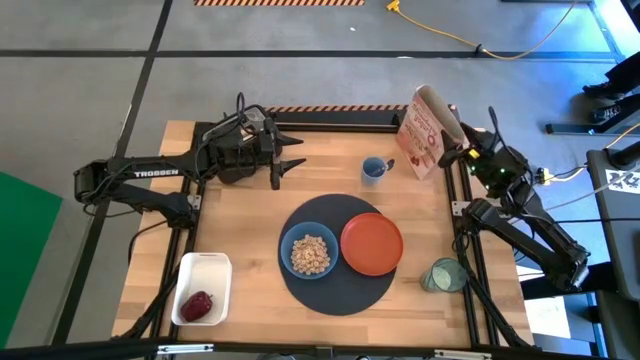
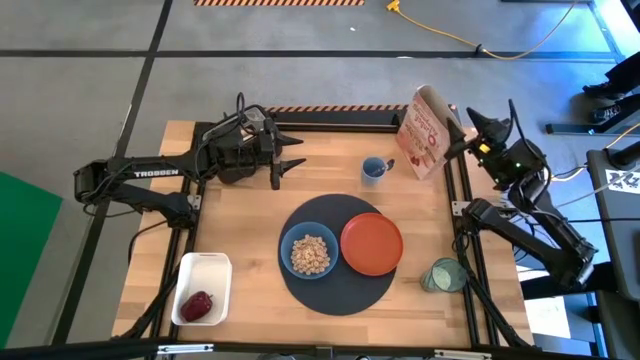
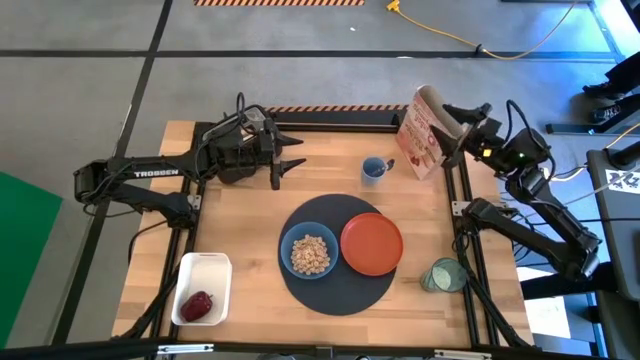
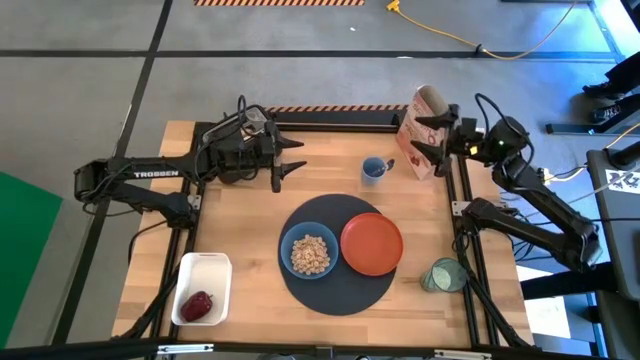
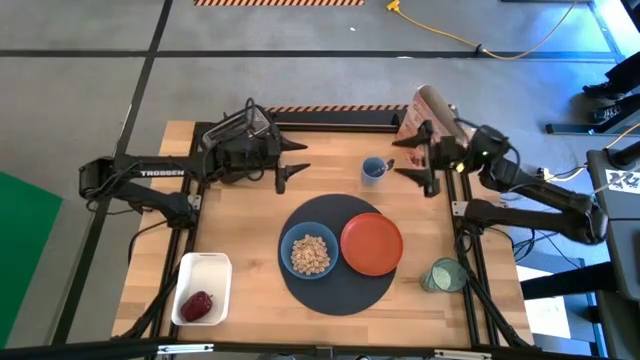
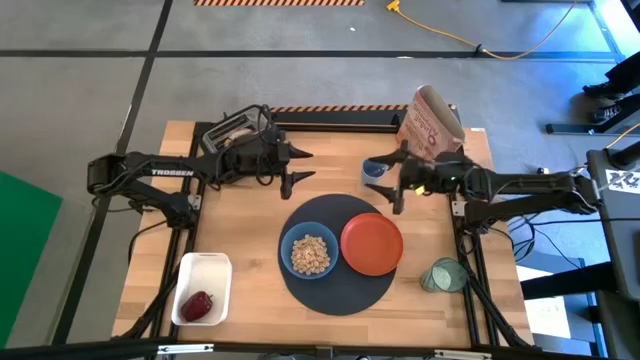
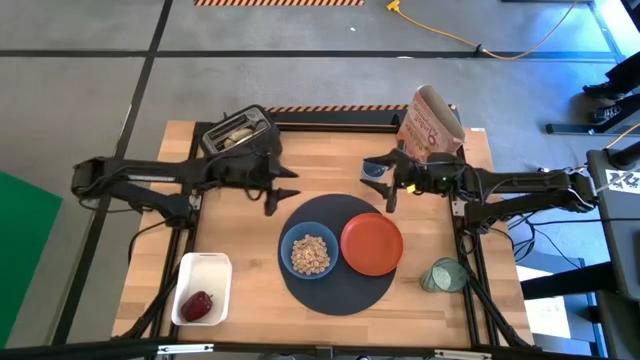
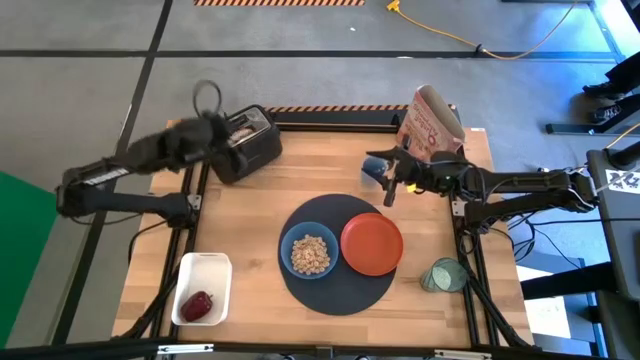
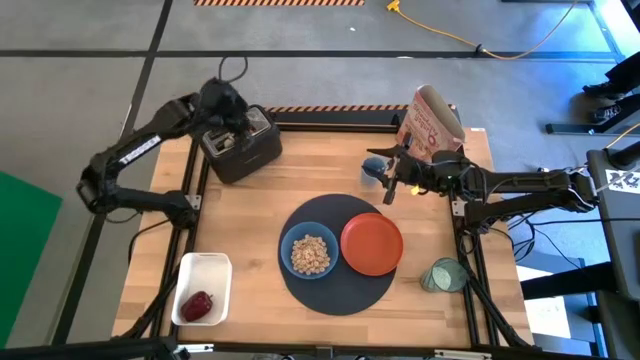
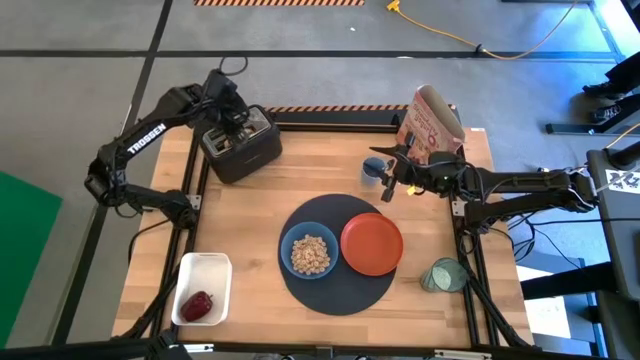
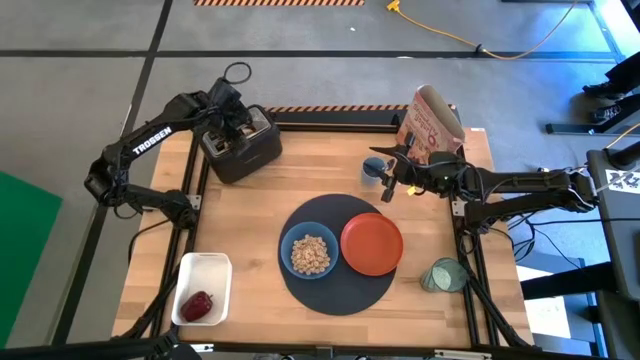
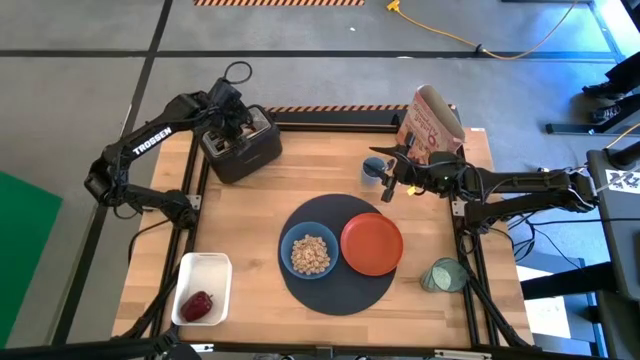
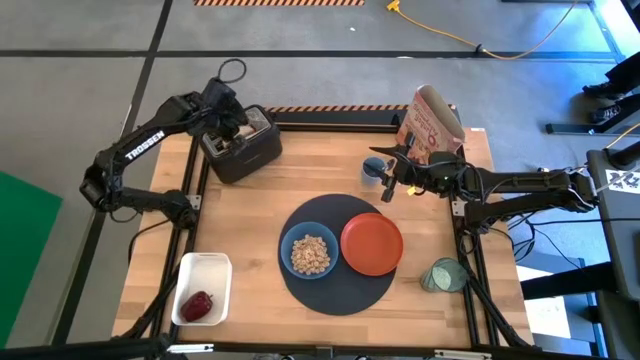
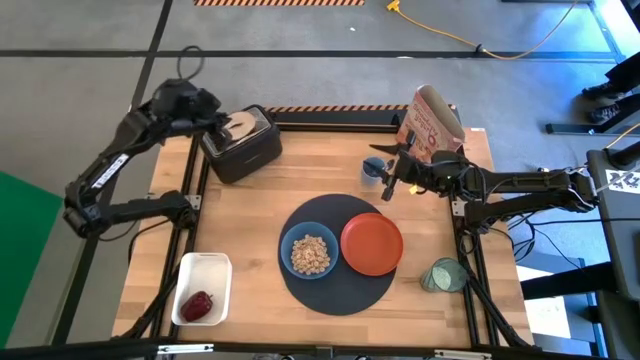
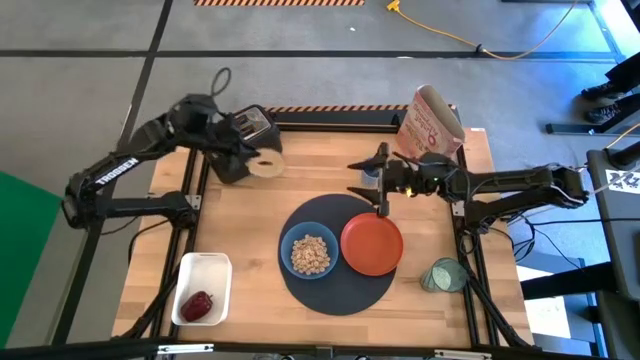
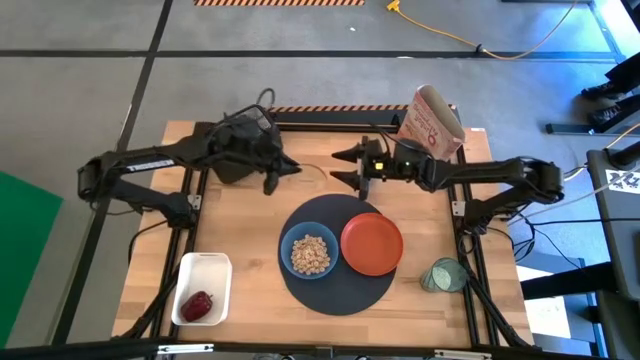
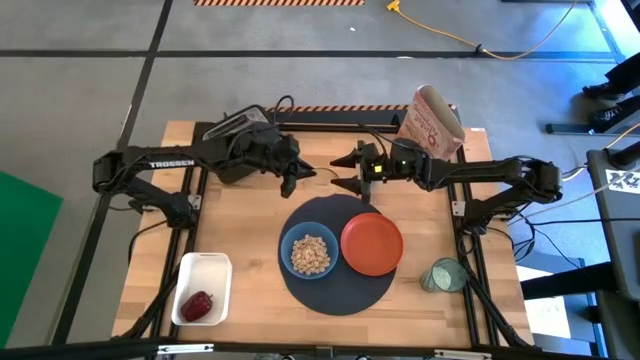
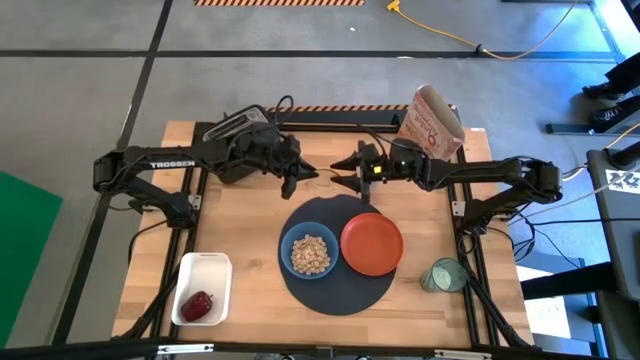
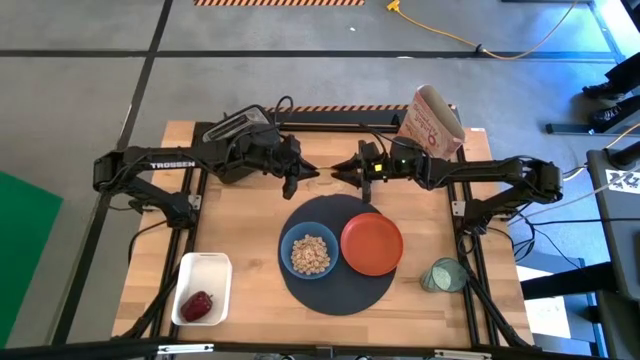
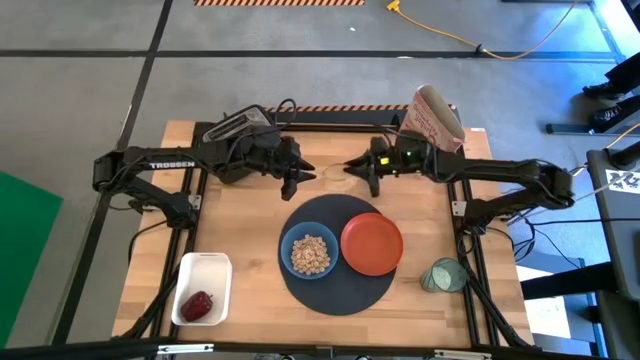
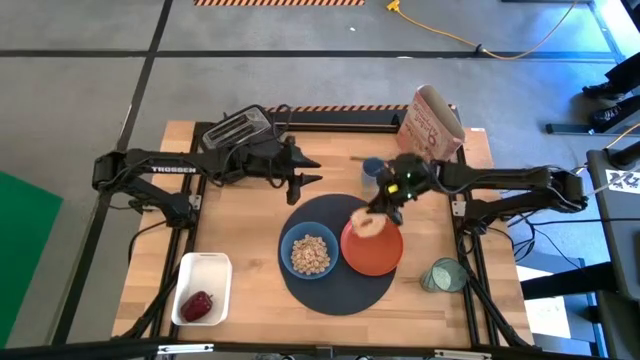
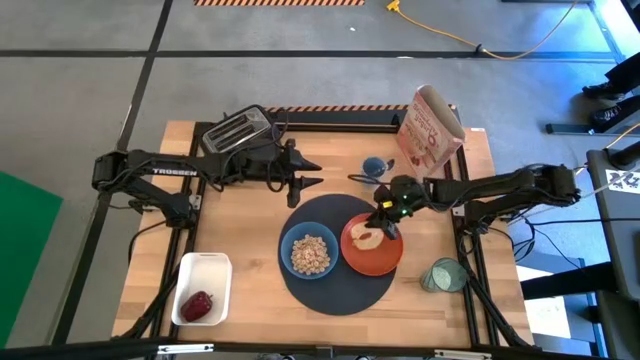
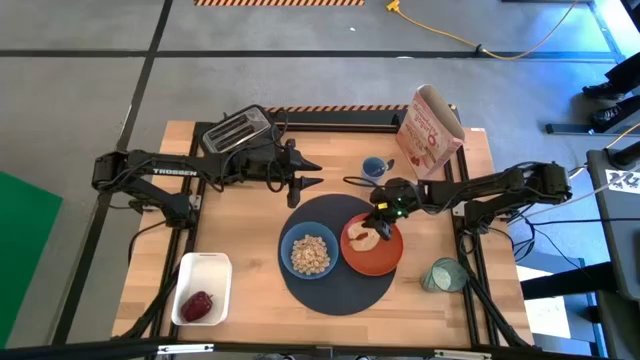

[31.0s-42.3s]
Task: Arrange a breakfast setting
Put the toasted bread on the orange plate

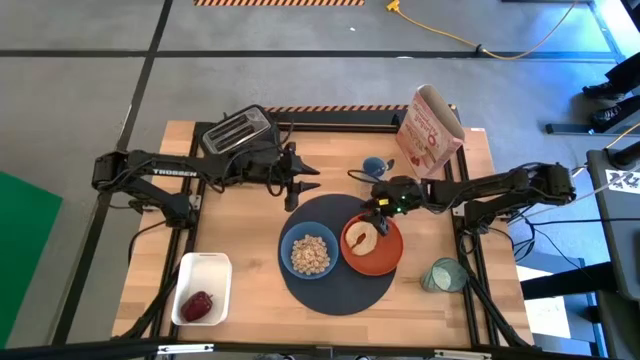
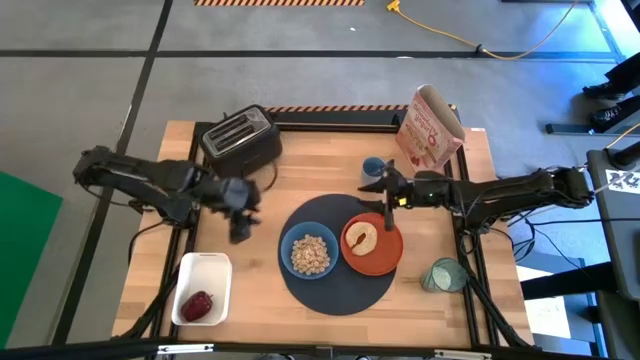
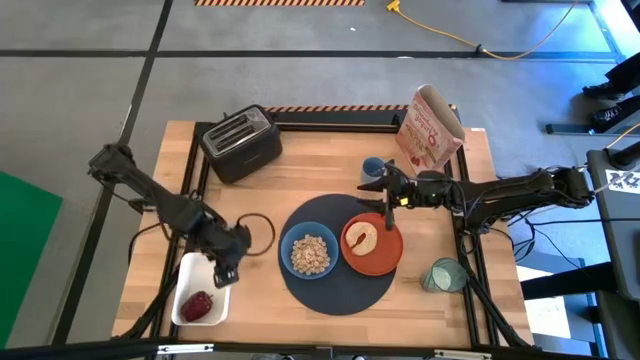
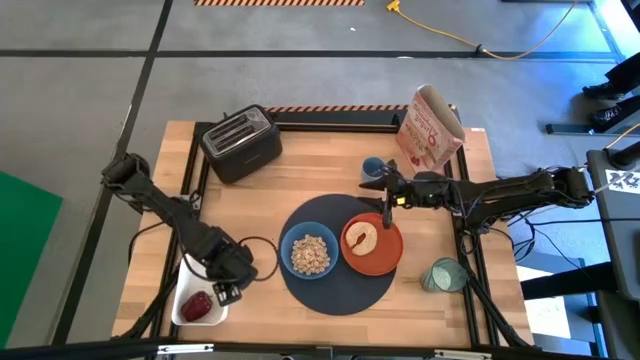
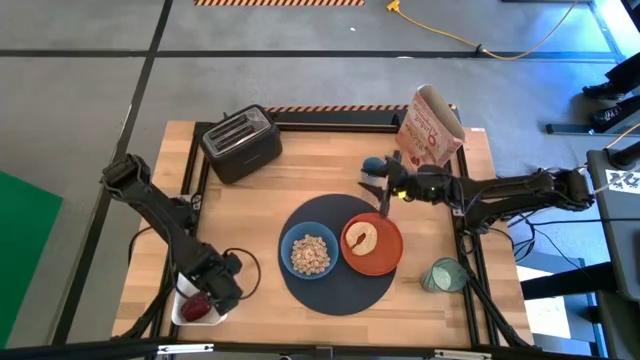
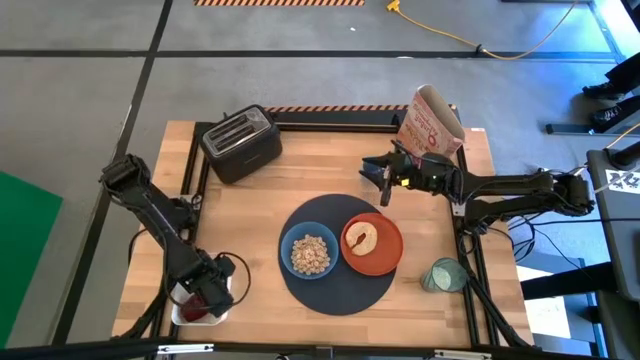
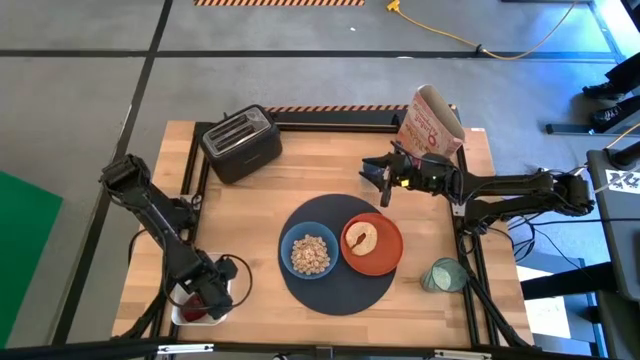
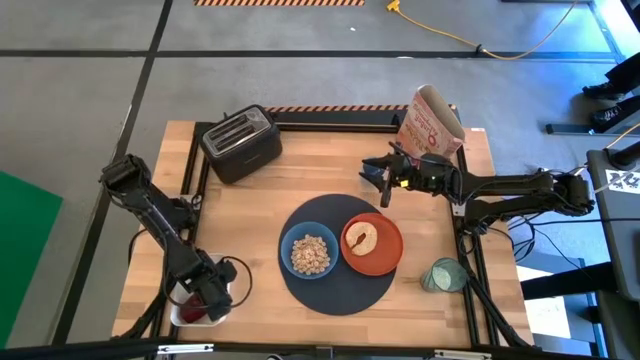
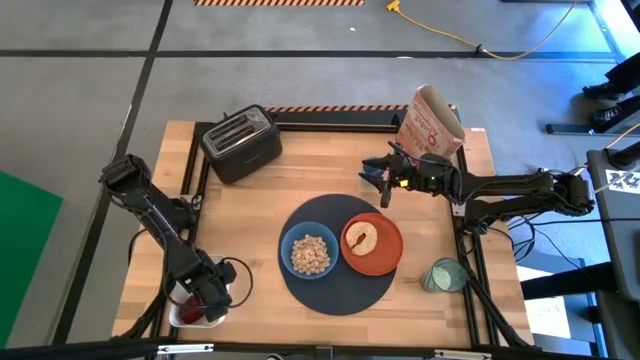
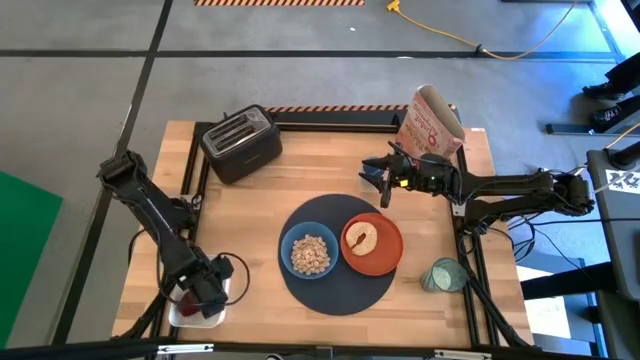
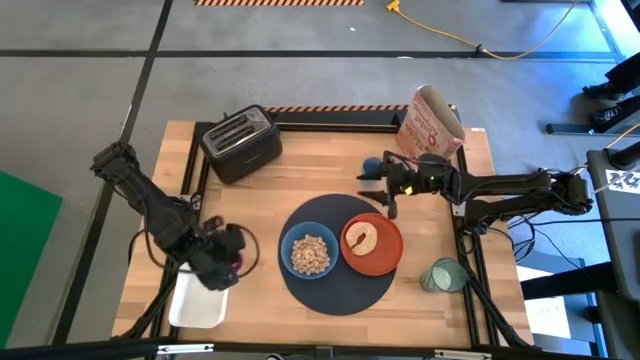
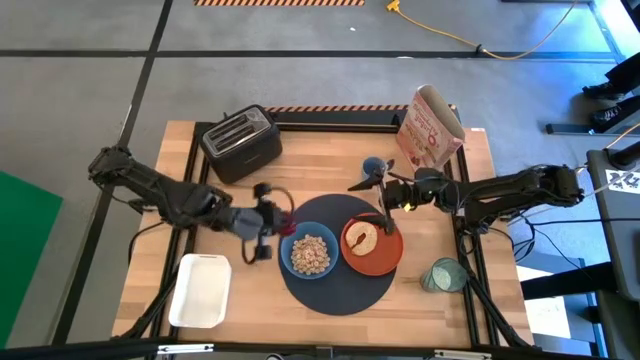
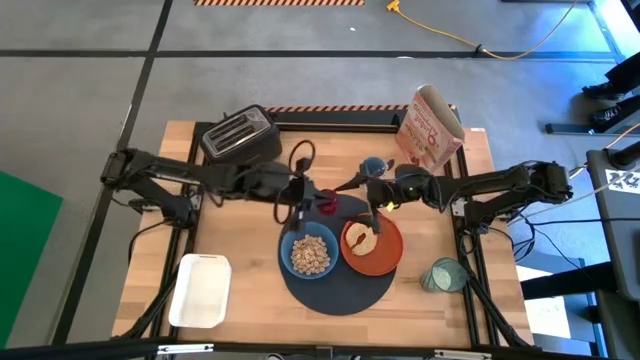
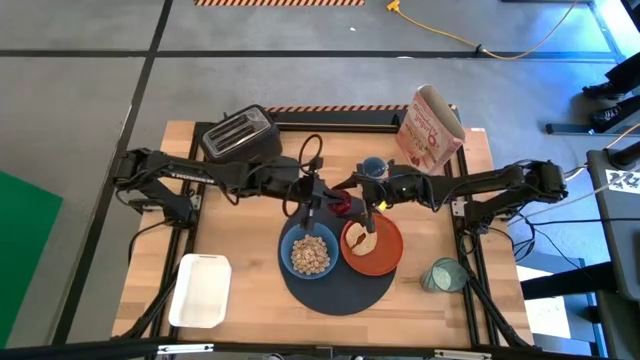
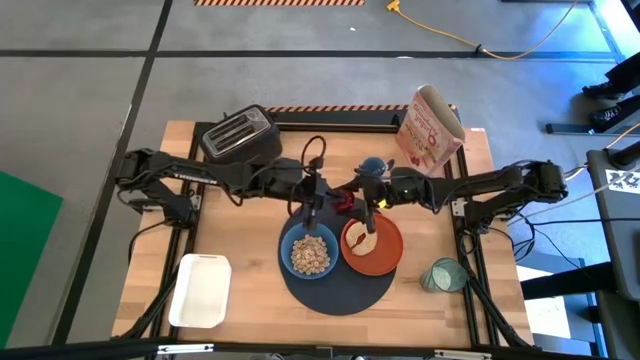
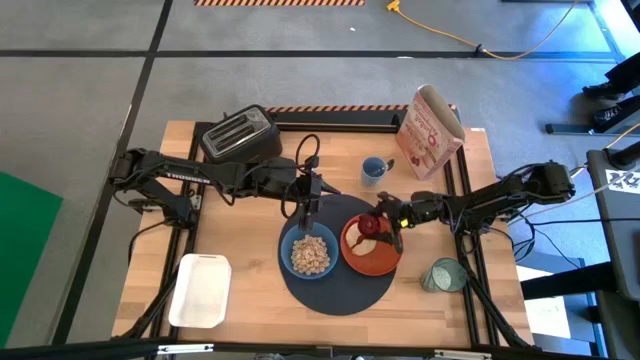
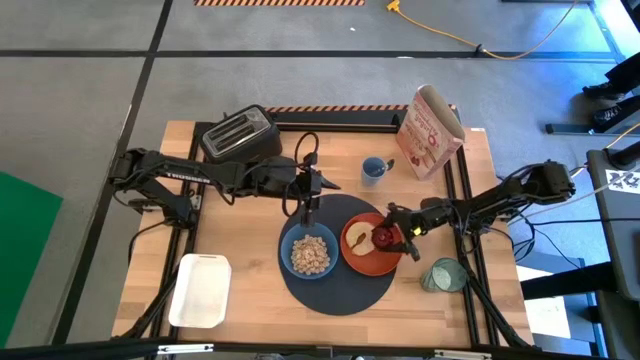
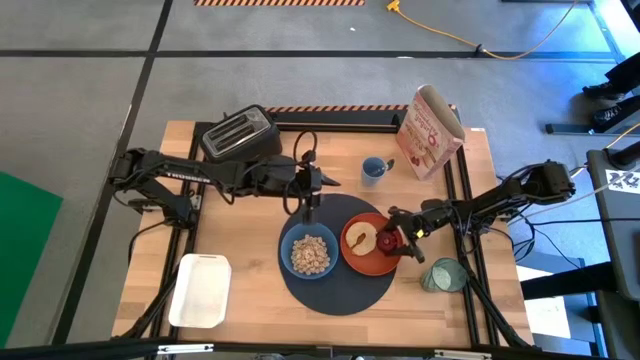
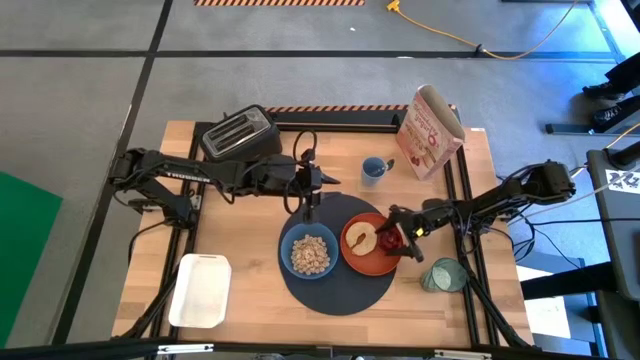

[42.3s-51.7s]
Put the apple on the orange plate

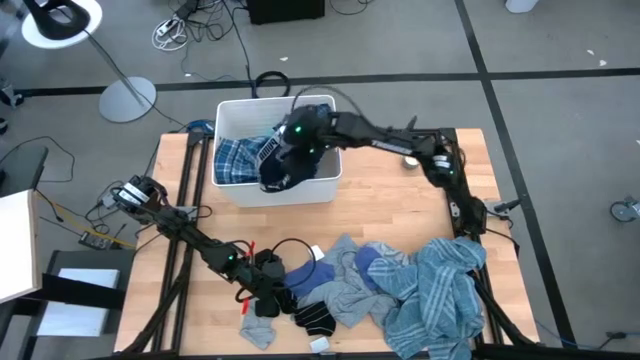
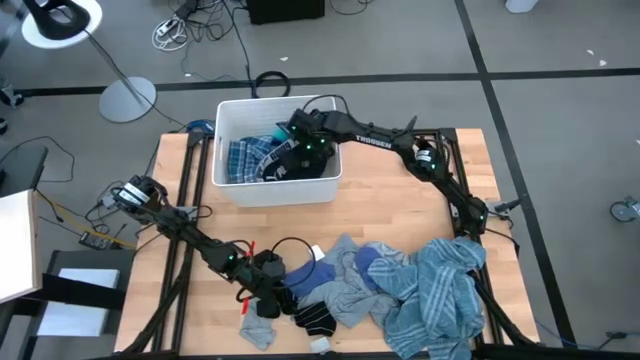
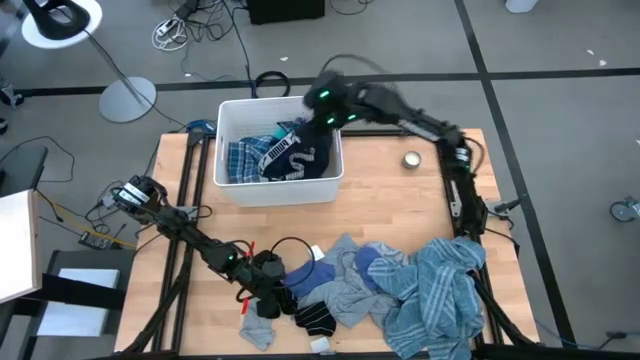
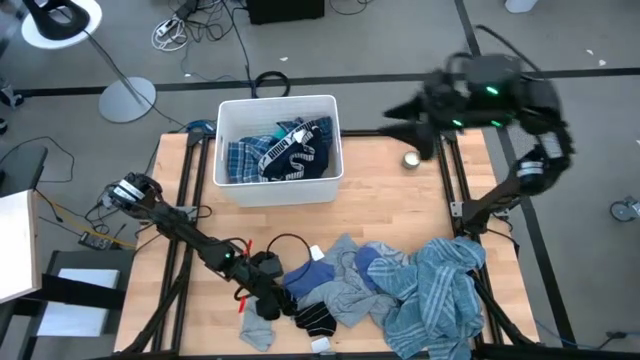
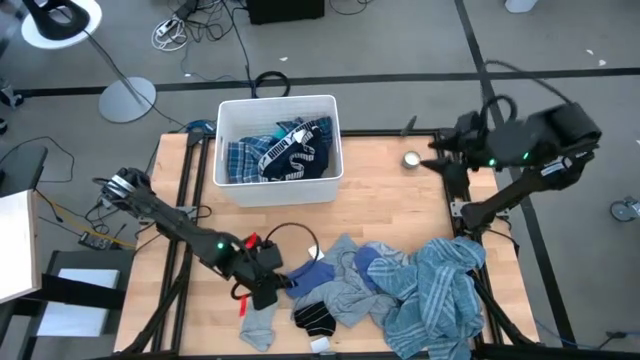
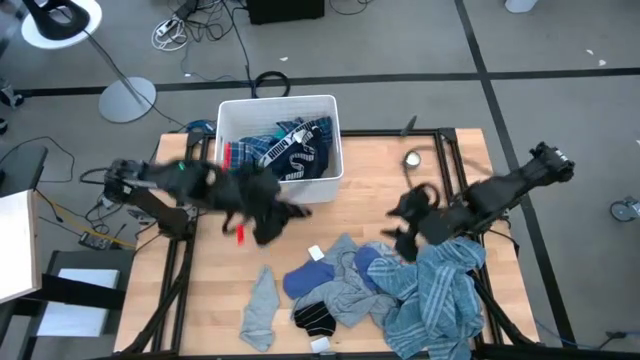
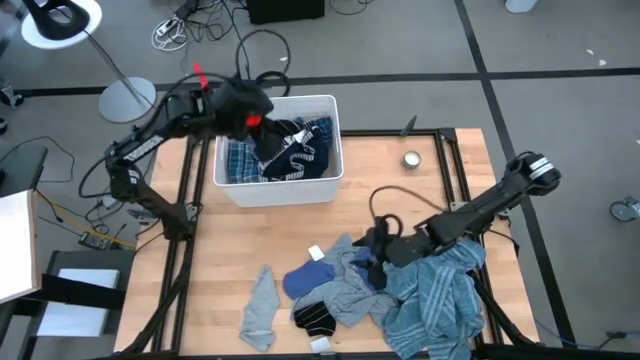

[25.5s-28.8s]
Task: Sort clothes
Put the left black sock into the white laundry bin
